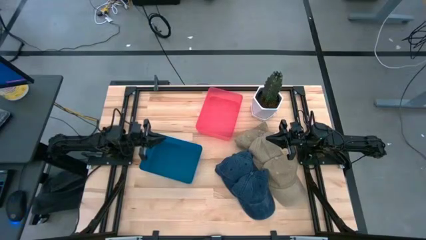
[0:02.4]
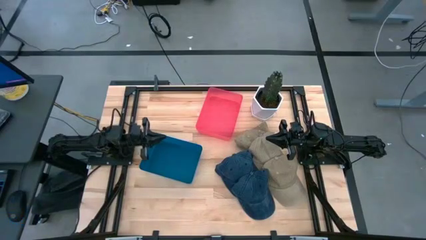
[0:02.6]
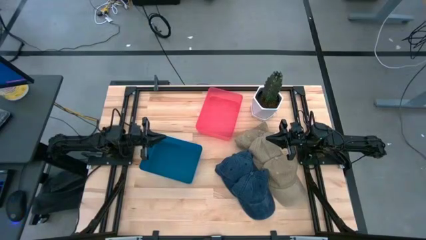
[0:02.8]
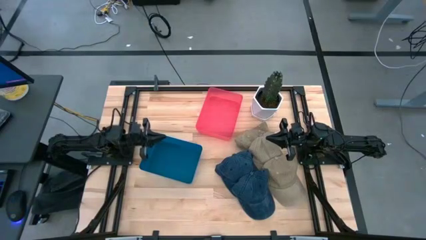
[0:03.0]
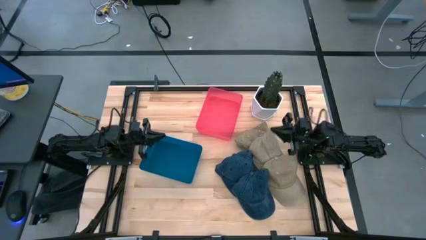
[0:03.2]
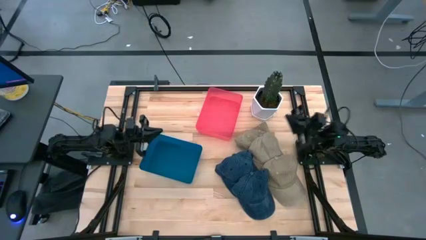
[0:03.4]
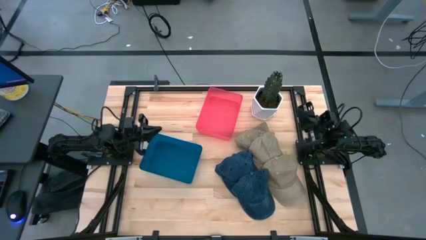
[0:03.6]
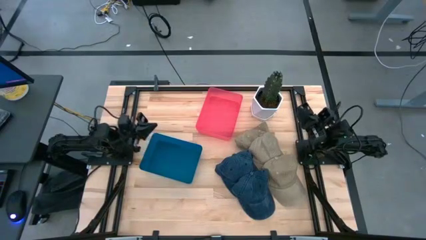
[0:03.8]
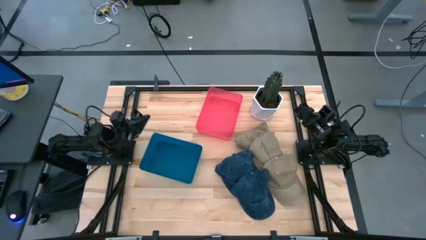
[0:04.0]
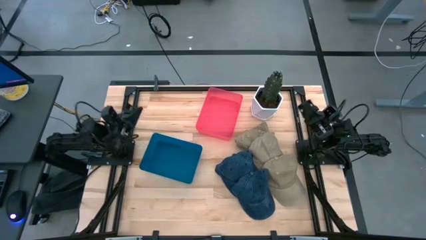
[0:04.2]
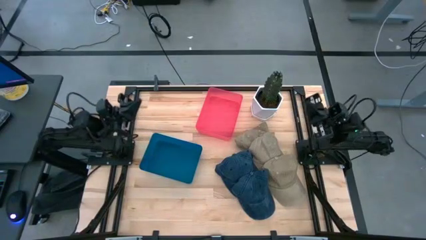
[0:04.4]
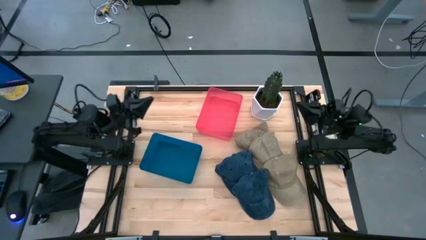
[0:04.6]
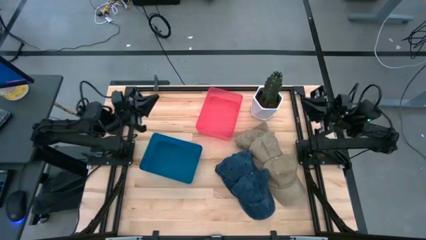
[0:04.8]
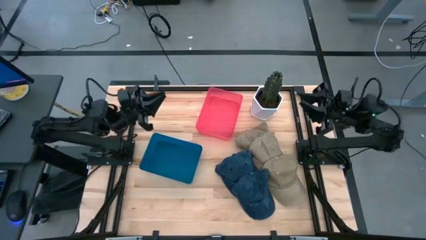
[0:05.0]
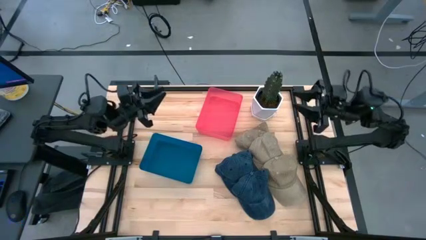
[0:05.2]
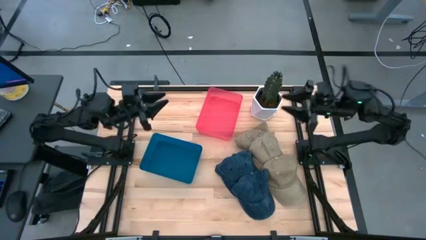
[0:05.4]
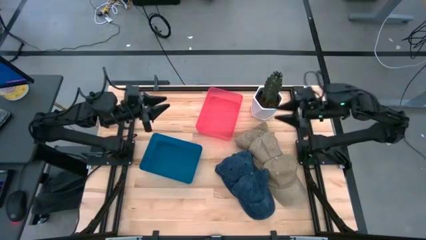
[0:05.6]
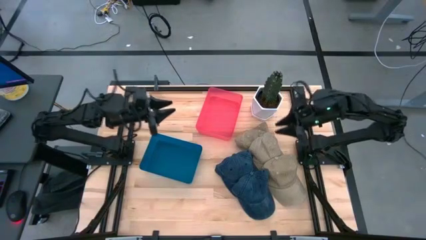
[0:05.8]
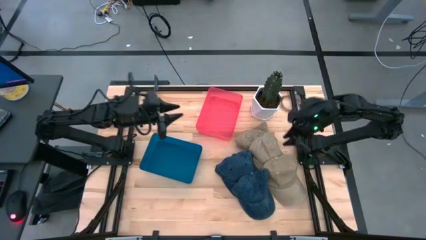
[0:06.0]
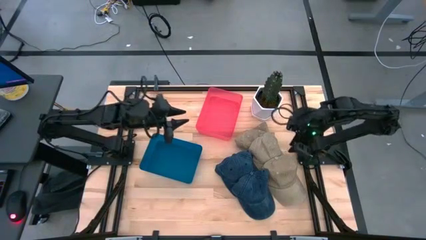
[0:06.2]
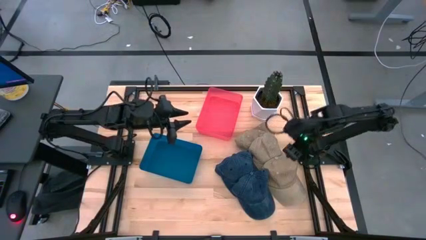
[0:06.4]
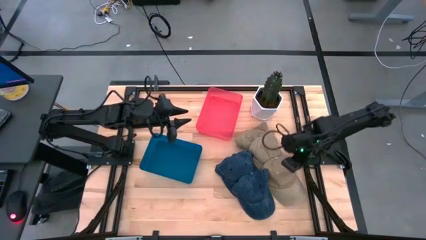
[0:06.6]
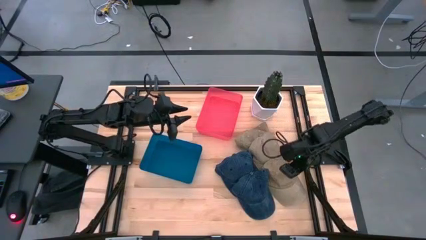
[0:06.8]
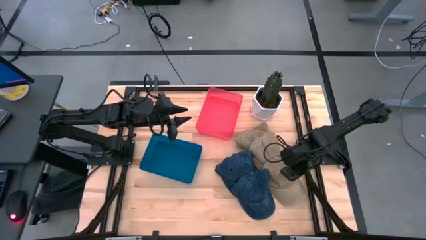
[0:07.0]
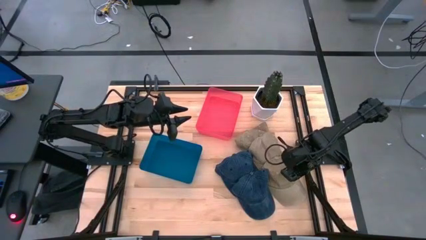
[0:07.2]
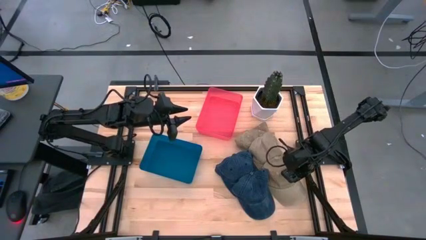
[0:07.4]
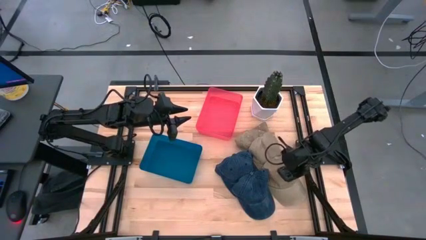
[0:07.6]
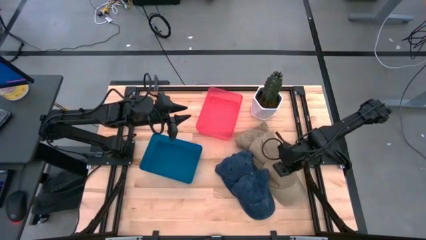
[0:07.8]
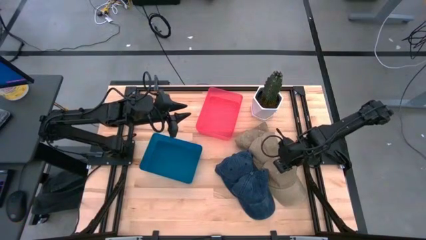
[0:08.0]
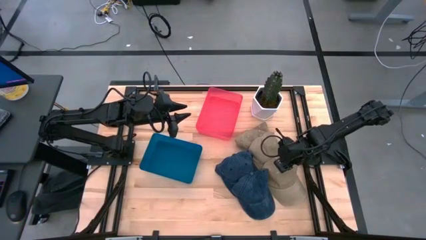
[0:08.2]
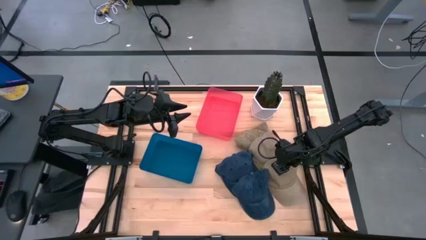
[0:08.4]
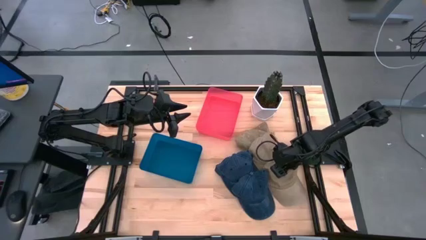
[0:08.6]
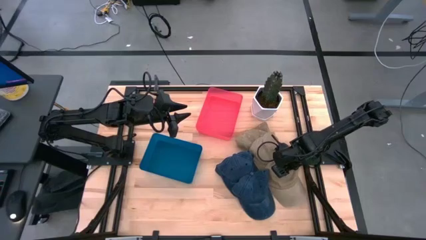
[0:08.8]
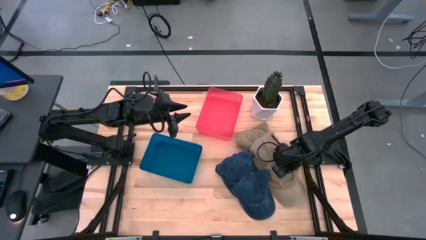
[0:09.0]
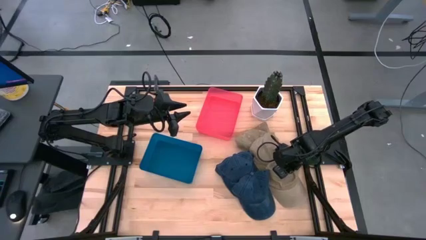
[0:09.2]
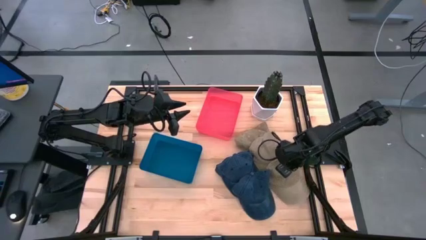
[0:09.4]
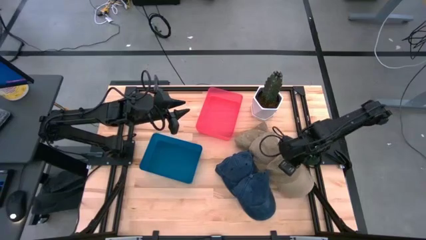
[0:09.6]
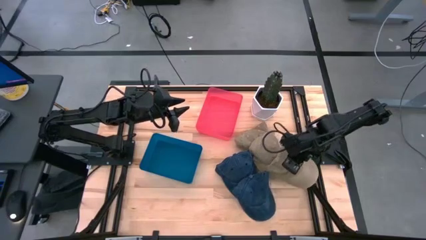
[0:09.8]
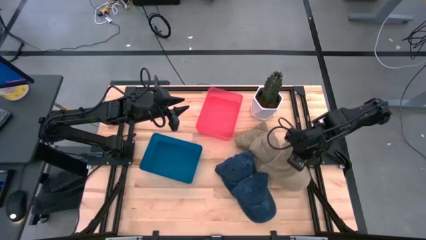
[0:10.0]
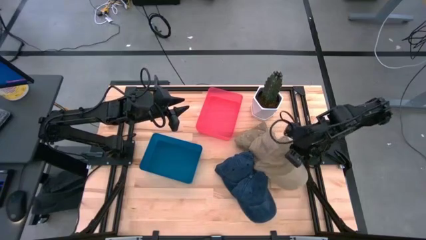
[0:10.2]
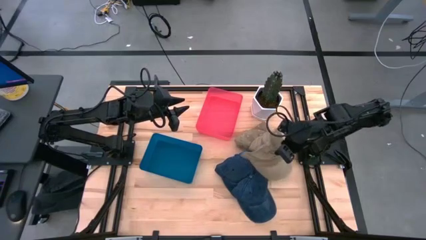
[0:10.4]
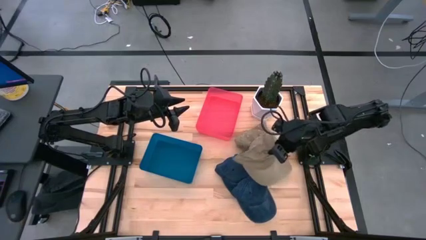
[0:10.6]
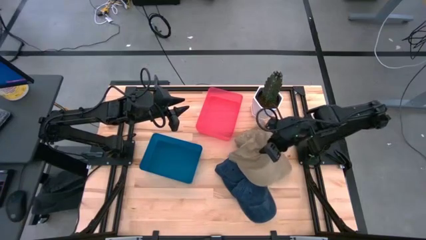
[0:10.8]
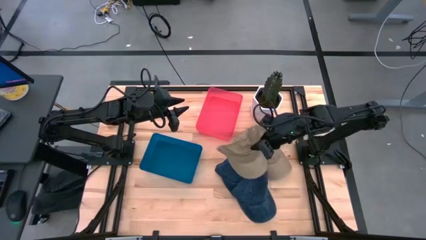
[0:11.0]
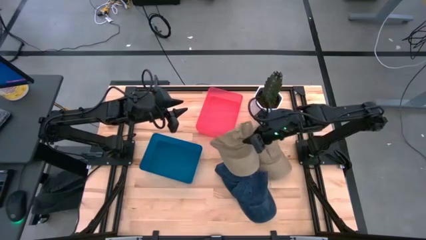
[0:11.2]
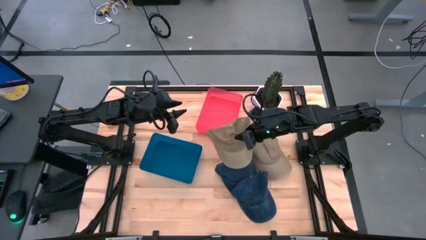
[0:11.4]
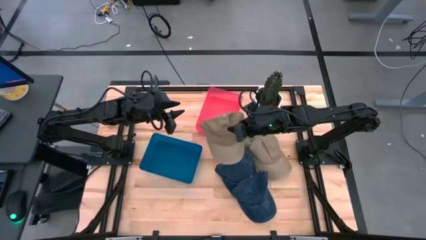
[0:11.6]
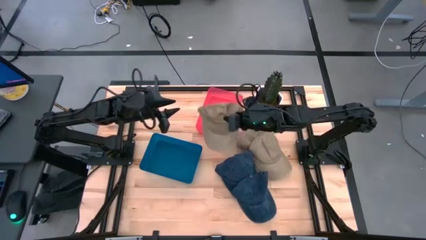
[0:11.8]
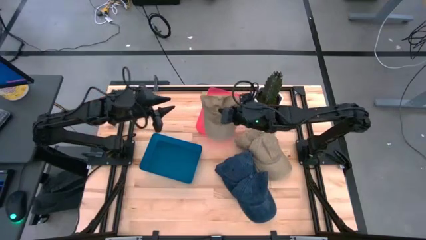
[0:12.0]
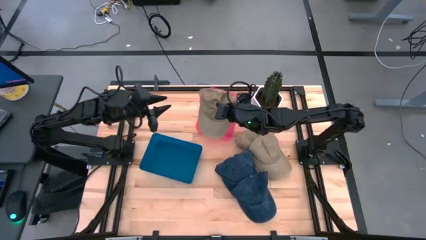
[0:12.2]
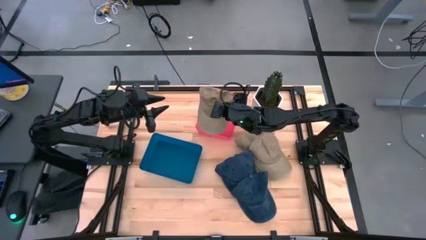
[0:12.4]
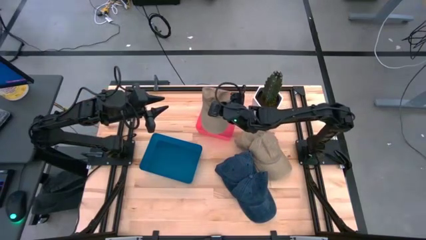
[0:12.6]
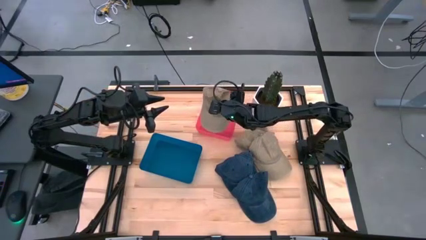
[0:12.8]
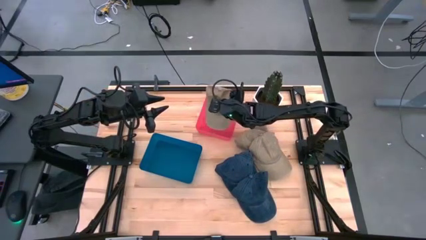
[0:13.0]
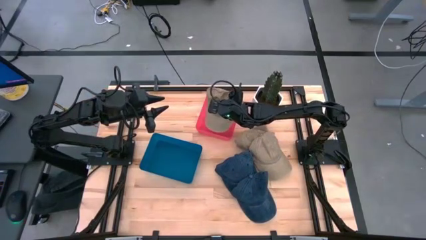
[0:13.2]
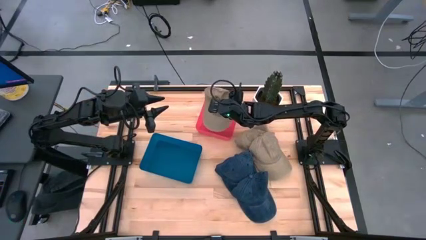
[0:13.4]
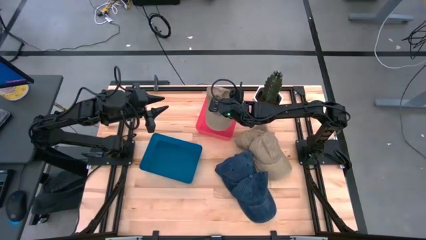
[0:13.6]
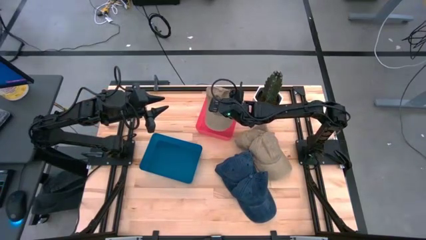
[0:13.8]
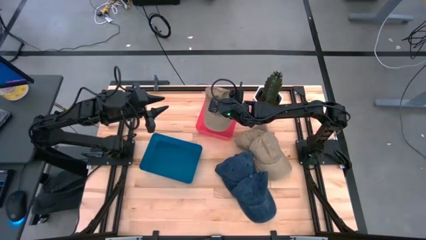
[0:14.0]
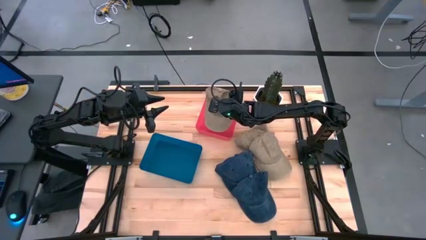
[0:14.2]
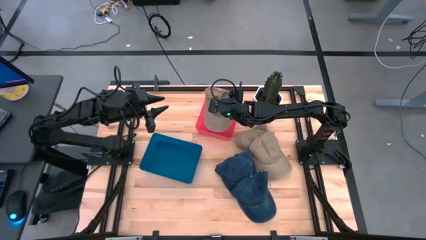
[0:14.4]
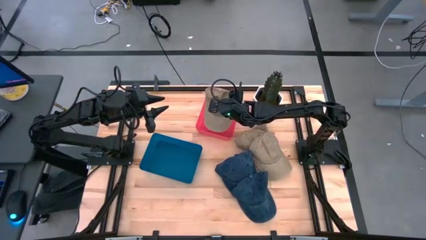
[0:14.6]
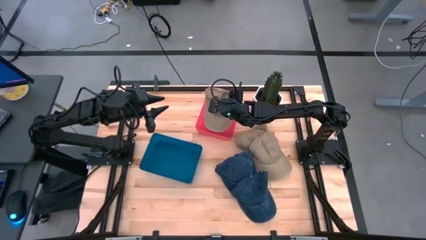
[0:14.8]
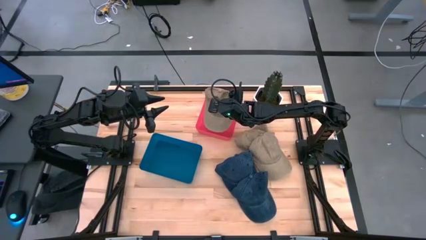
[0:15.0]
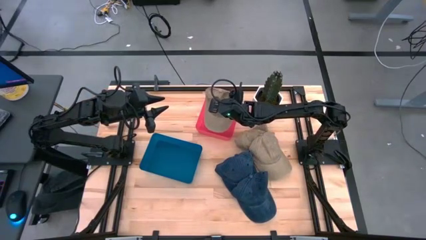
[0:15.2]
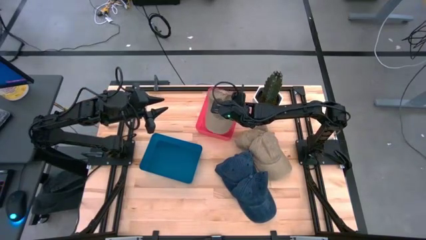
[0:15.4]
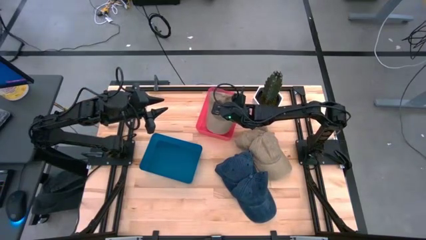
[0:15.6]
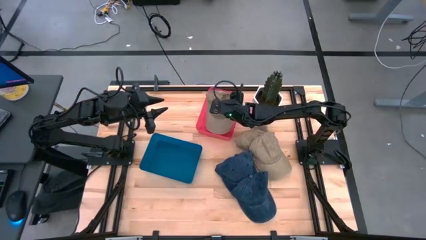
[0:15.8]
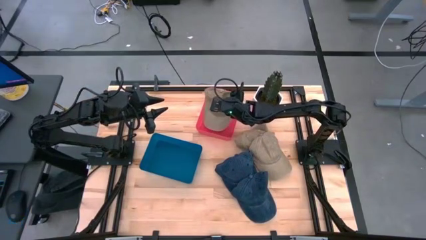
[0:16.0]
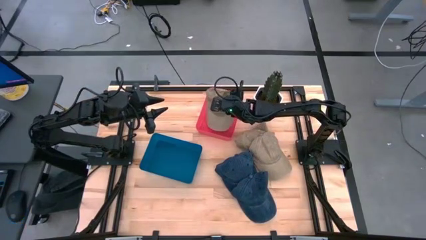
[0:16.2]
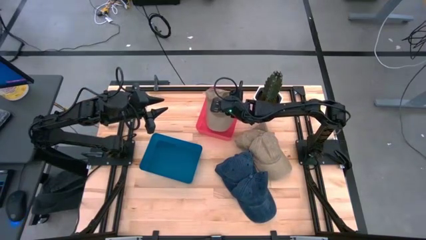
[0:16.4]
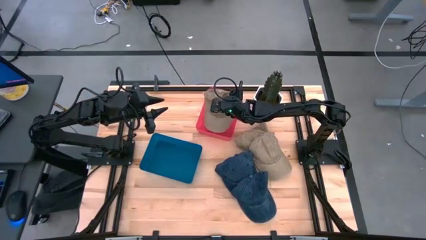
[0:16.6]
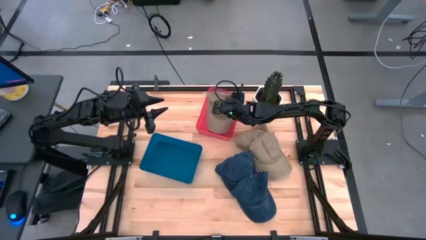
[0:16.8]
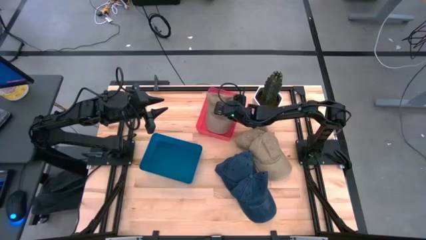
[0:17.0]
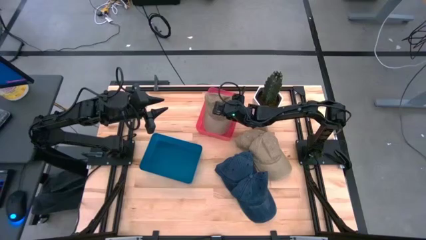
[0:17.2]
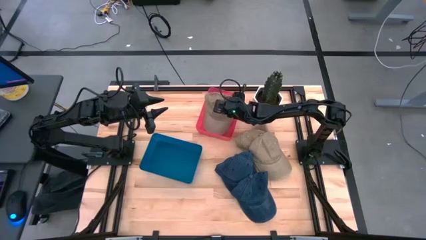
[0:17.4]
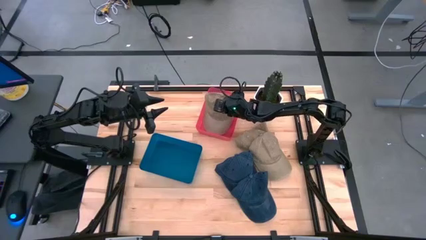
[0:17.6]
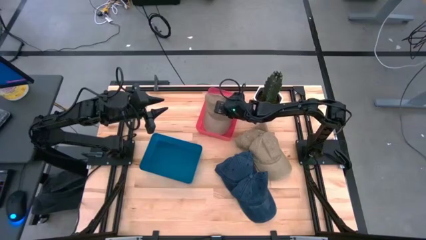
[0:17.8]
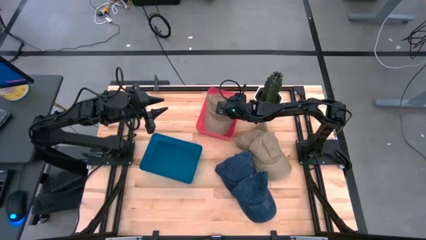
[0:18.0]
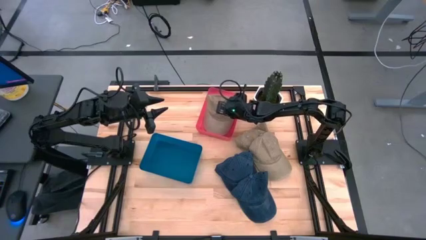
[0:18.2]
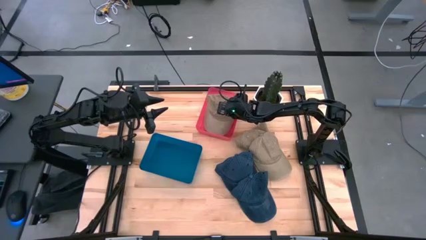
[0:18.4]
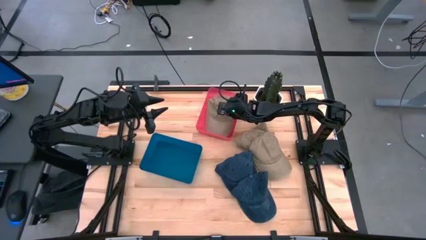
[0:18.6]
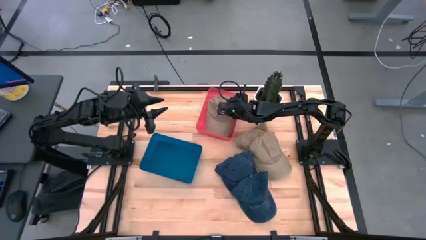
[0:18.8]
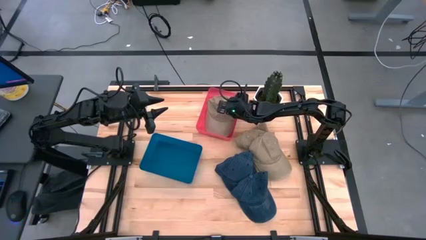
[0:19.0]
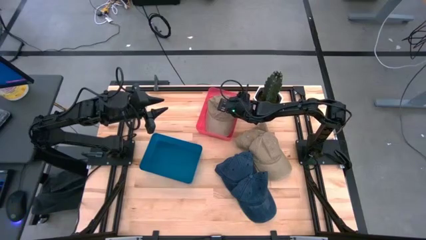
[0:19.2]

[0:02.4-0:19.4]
Task: Pick & Place hat
Put the bottom brown cap into the pink bin
